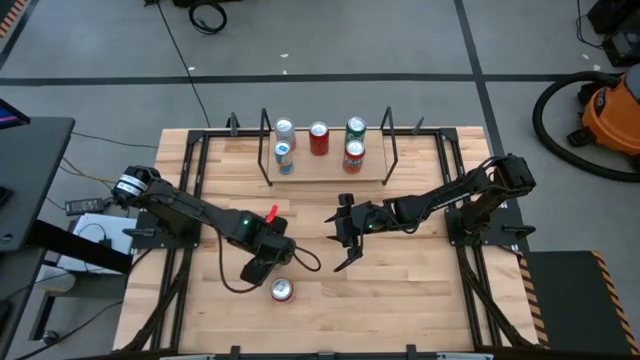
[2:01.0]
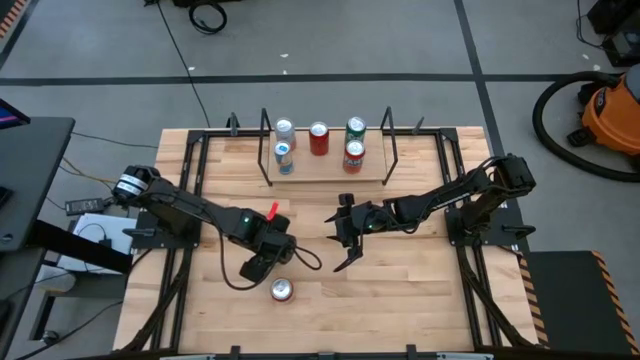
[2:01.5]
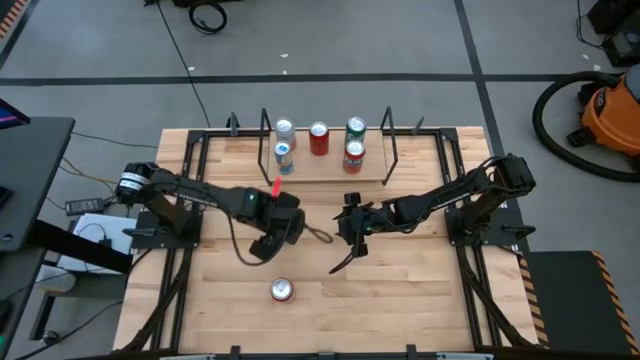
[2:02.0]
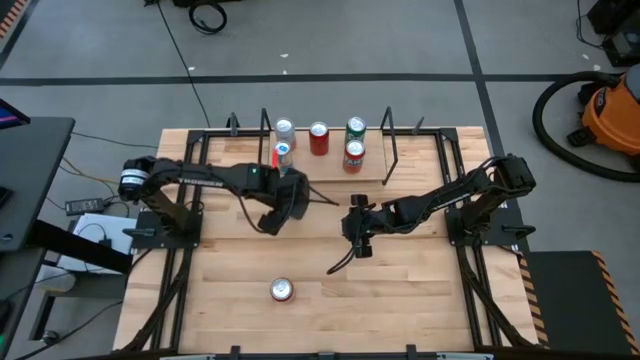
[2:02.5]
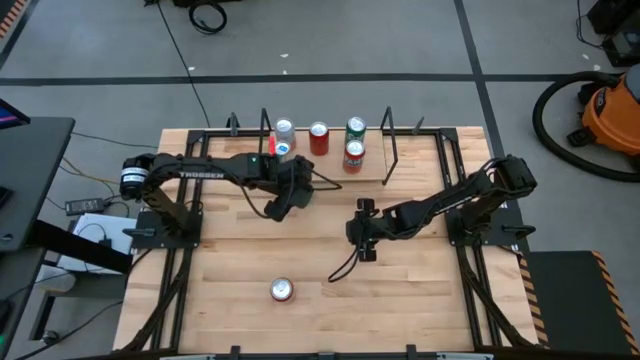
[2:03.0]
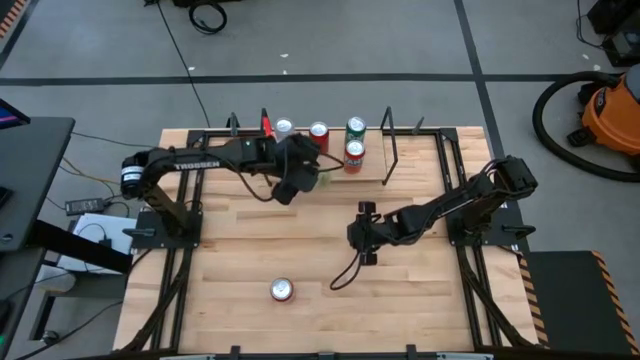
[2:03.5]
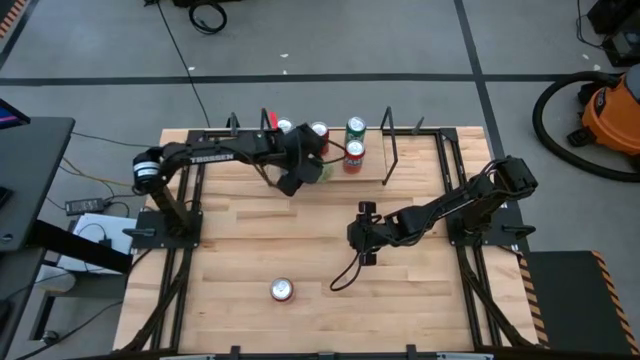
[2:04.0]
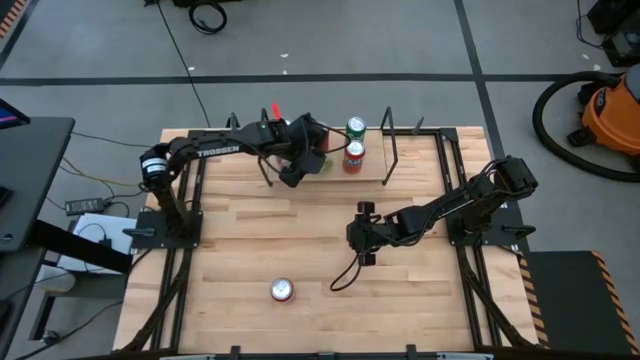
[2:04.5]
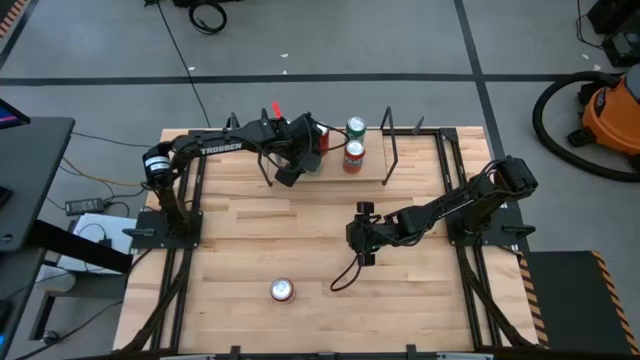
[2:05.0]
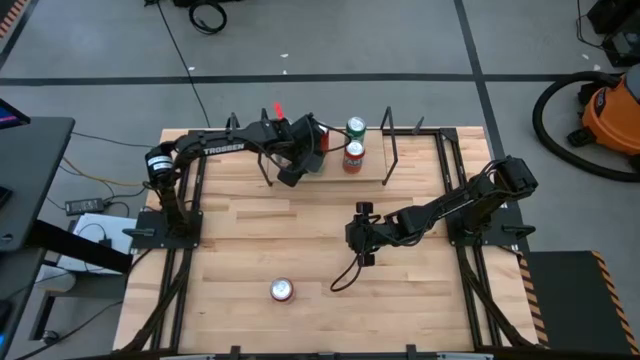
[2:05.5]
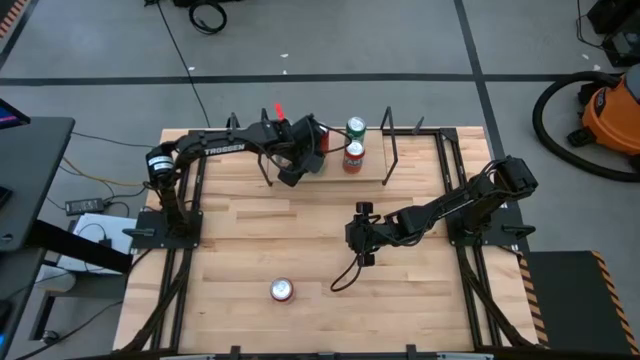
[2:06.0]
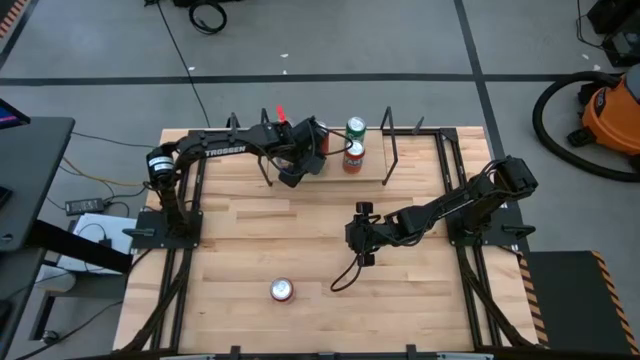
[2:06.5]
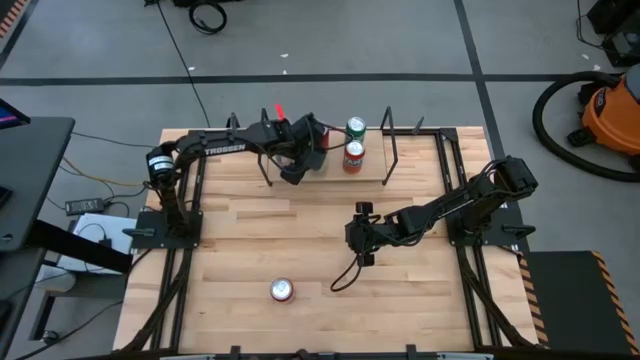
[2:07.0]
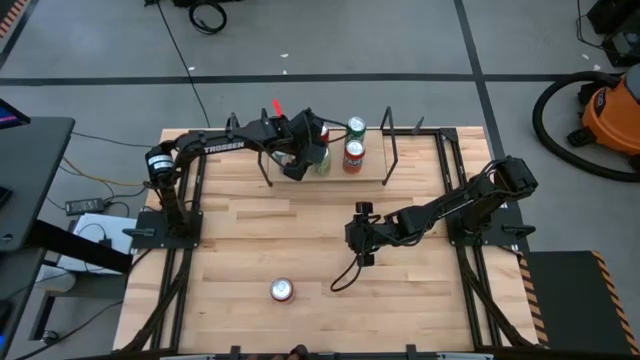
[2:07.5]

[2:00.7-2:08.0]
Task: Place canned beverage on shelf
Put the light green soda can on the shelf

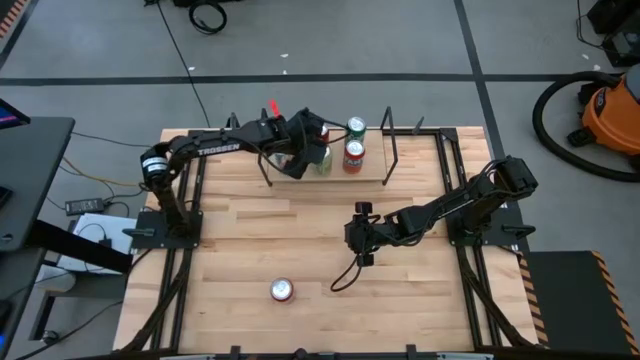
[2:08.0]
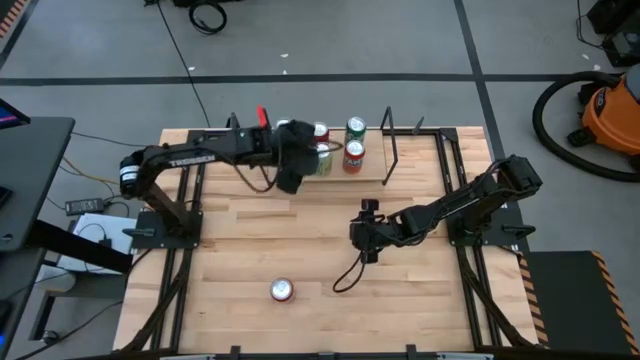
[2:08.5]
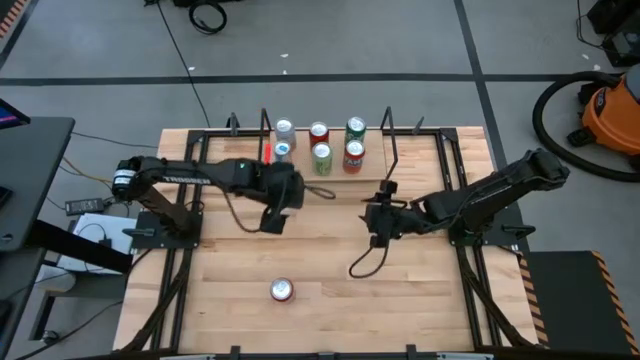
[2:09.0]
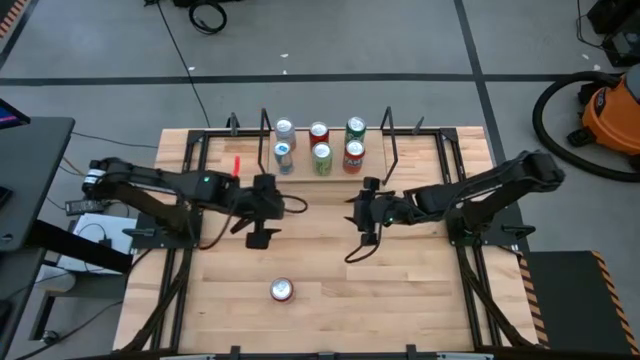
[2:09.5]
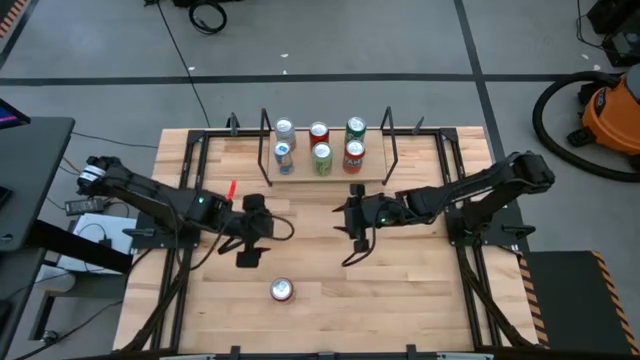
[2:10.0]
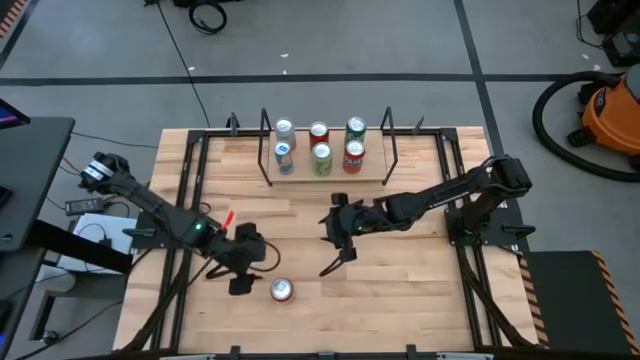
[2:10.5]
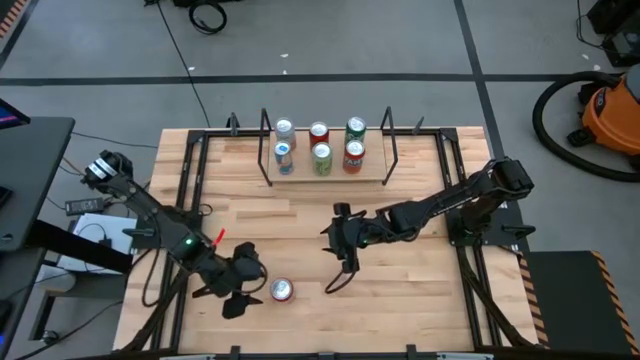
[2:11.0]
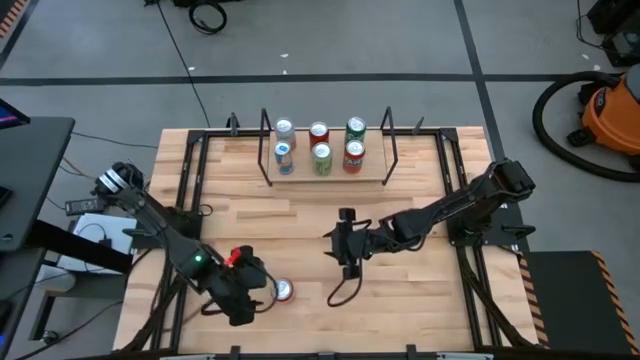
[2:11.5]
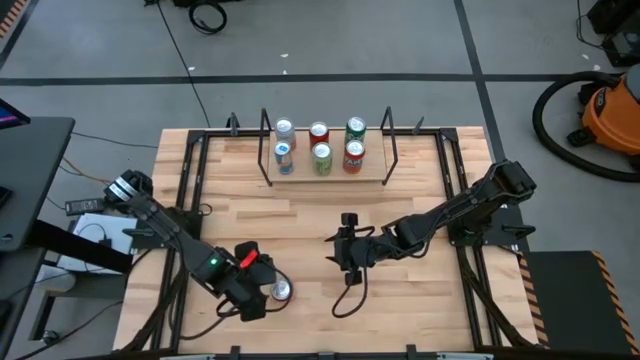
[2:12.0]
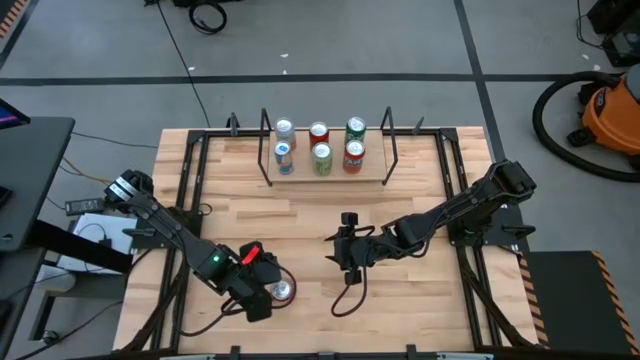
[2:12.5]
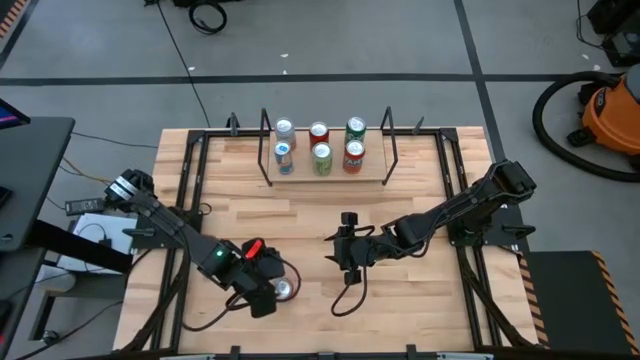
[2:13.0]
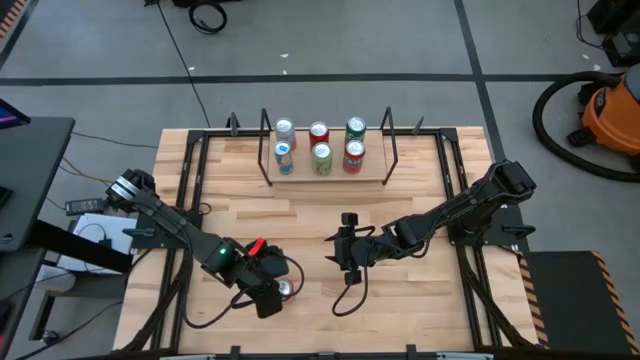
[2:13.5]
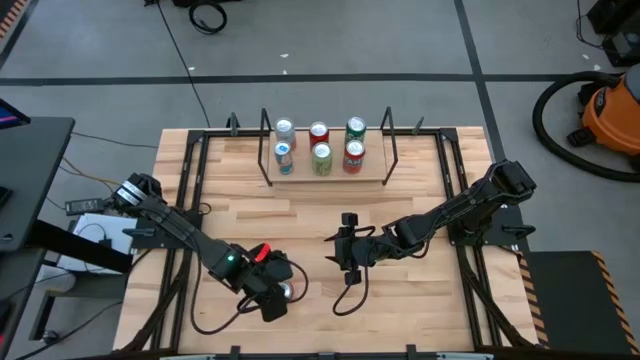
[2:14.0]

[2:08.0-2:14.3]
Put the red soda can on the shelf
